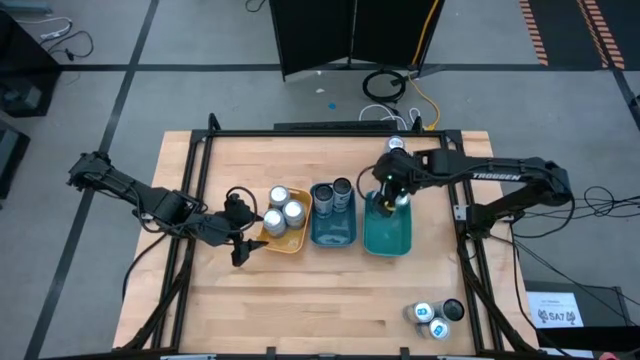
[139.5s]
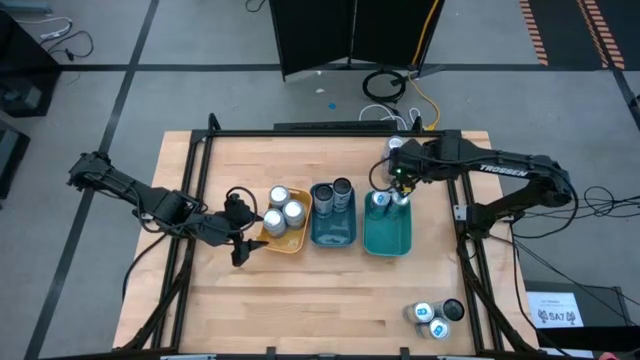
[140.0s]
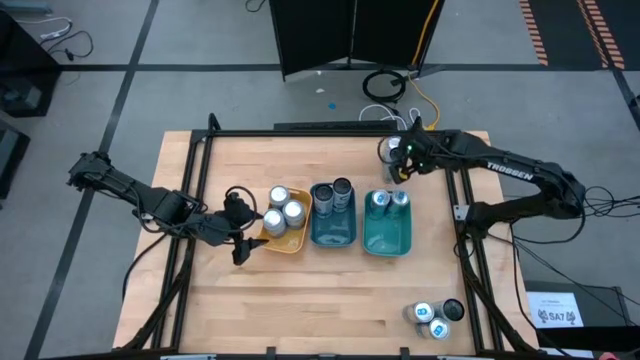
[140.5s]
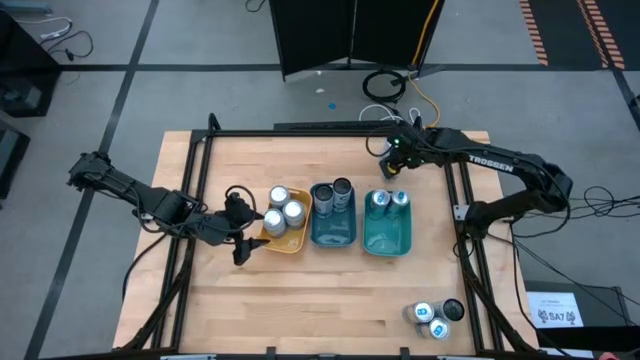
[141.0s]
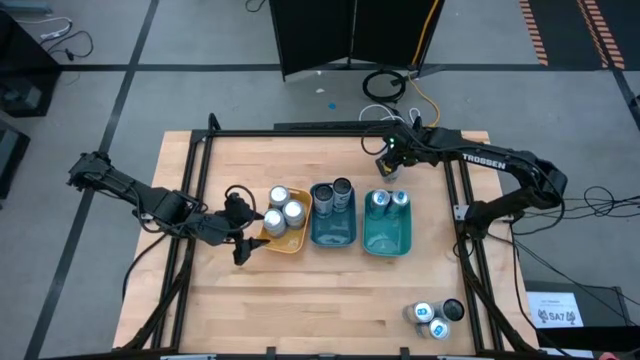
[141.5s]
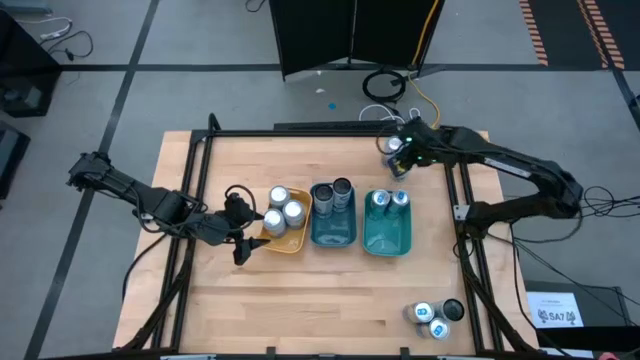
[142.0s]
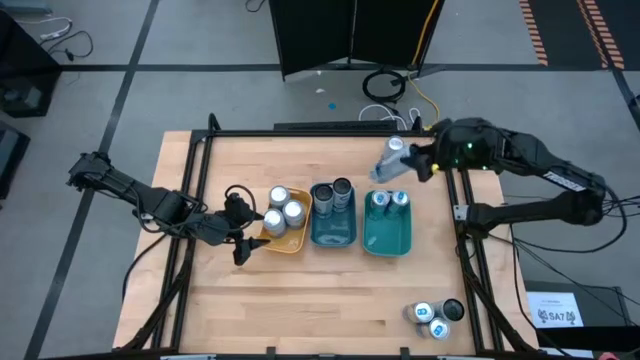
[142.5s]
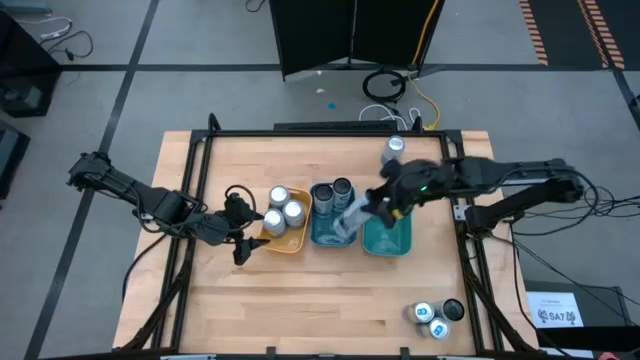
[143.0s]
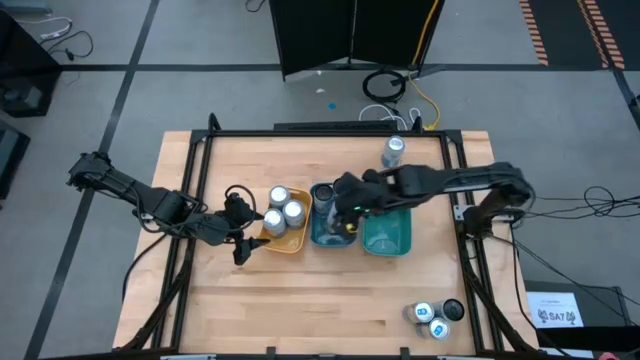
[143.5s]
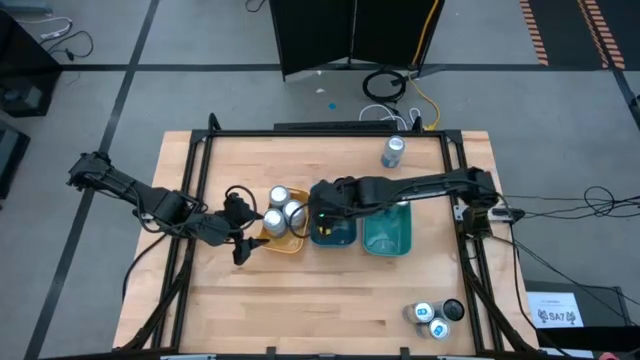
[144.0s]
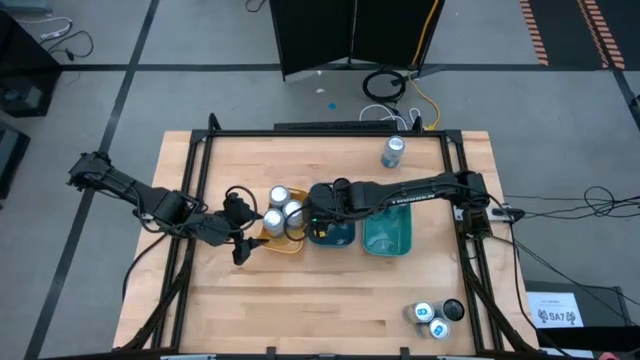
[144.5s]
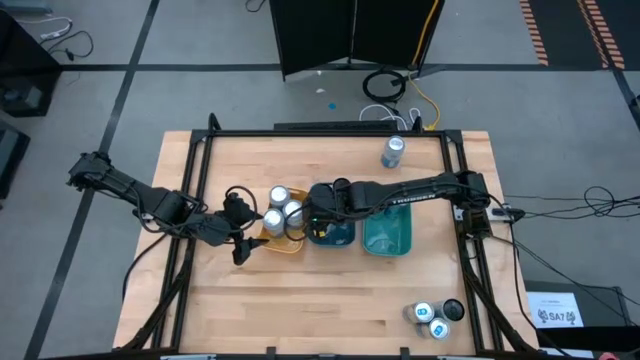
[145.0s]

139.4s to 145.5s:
Task: Sort soda cans
Put the white-blue soda can into the blue bin

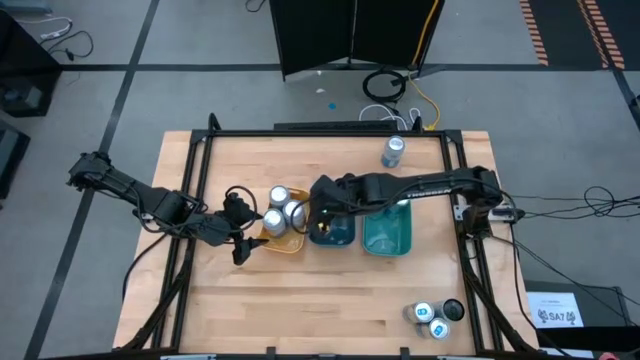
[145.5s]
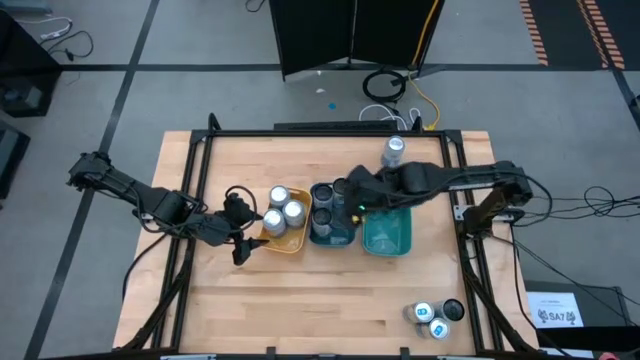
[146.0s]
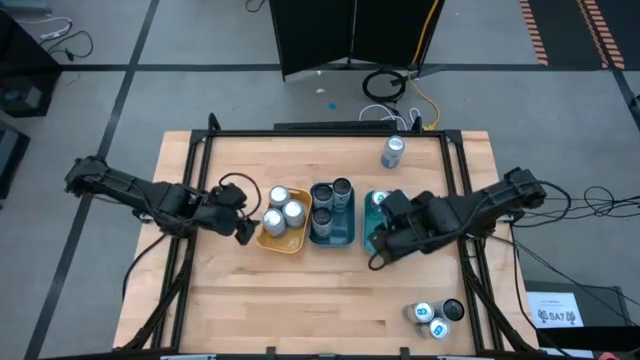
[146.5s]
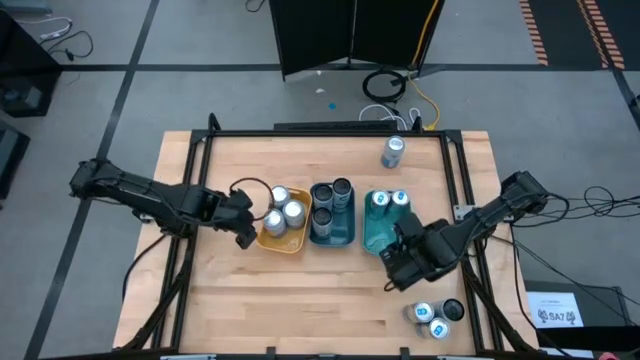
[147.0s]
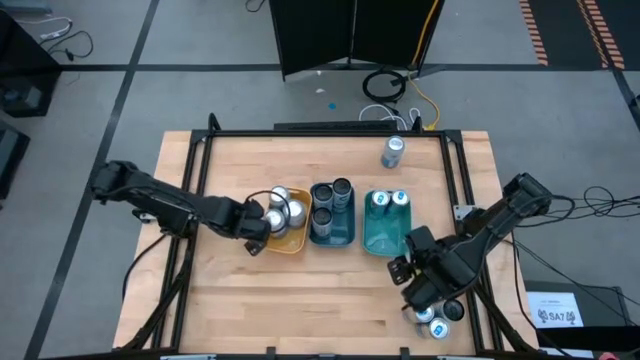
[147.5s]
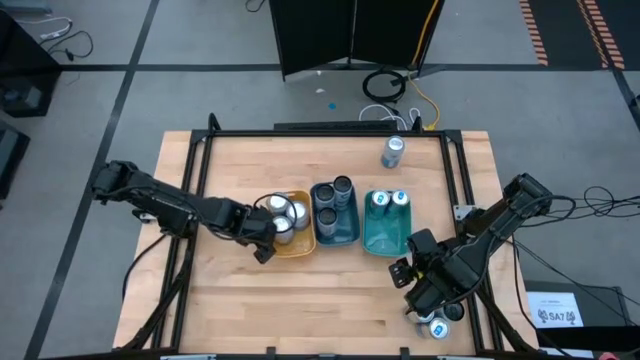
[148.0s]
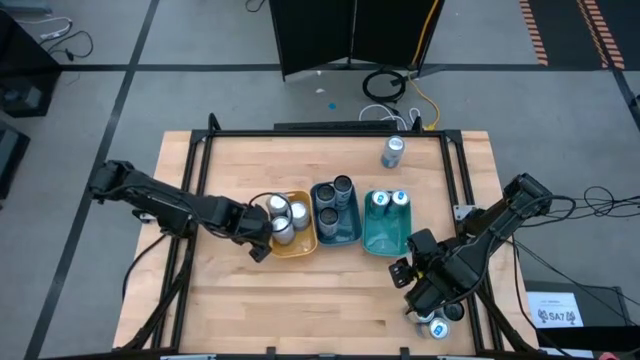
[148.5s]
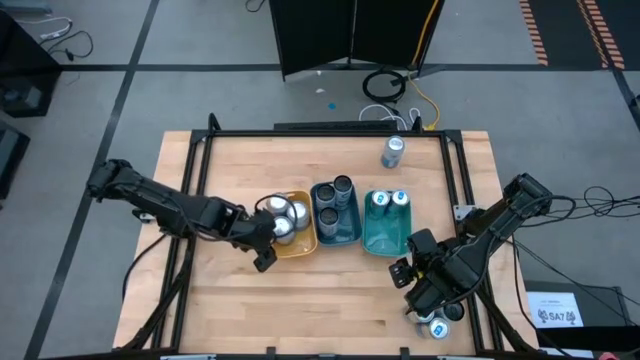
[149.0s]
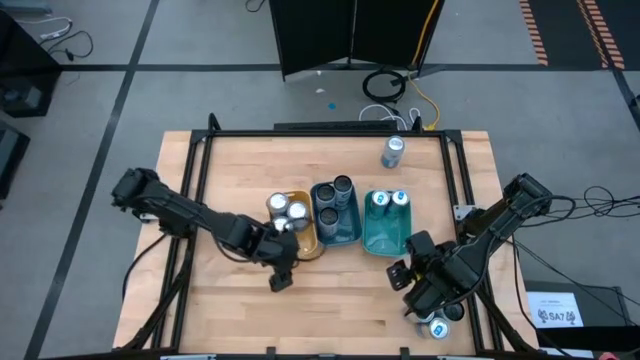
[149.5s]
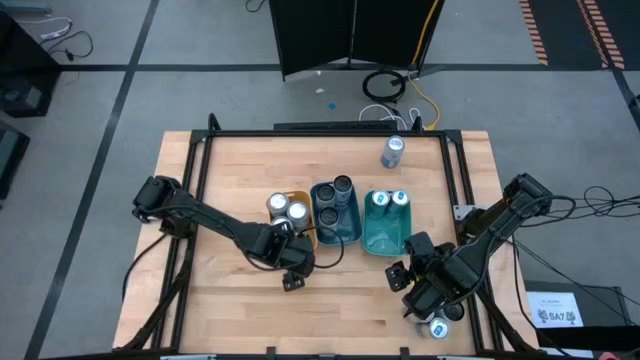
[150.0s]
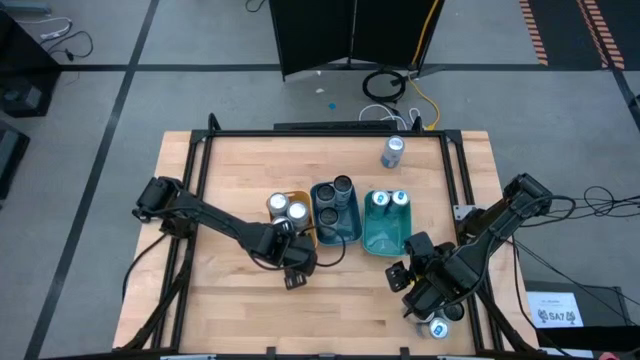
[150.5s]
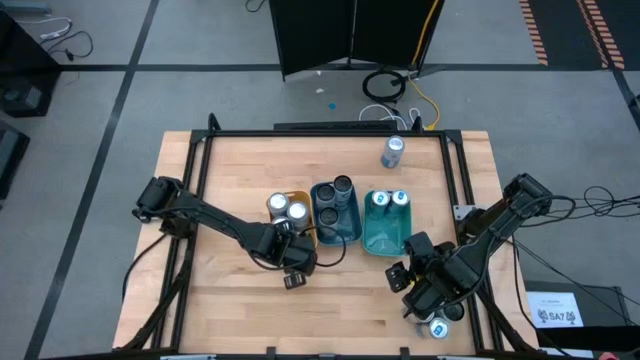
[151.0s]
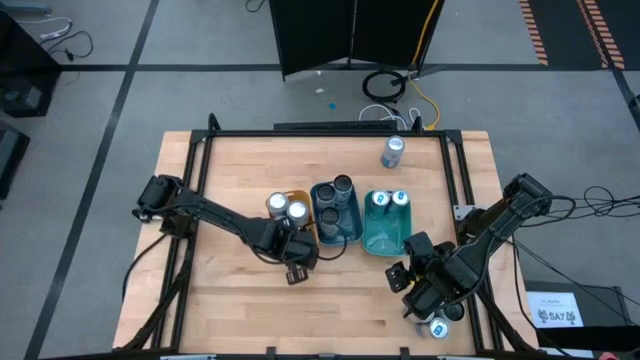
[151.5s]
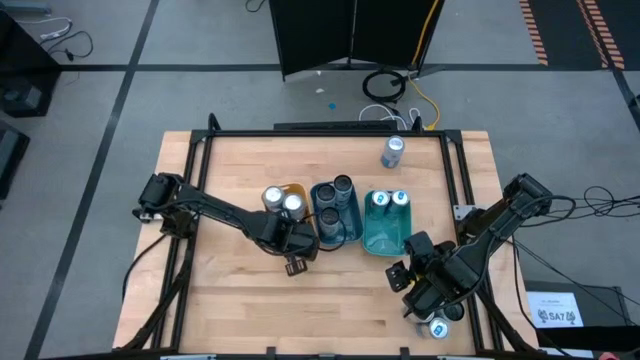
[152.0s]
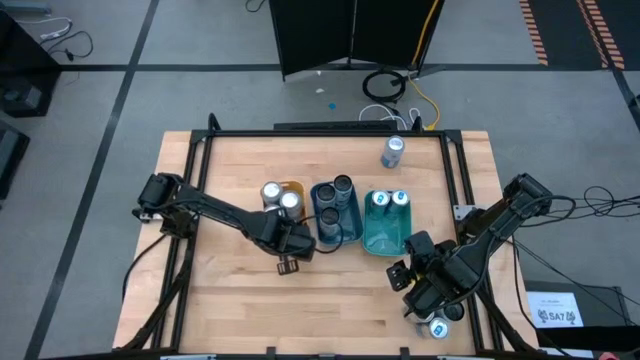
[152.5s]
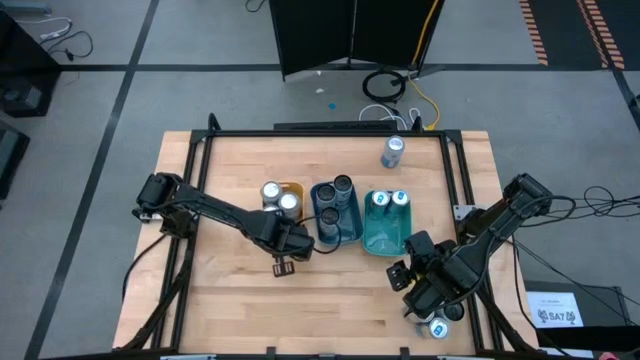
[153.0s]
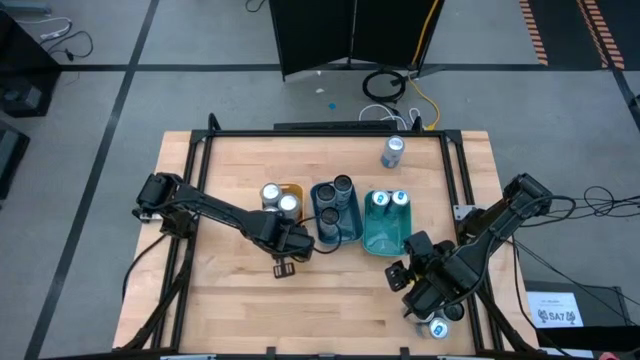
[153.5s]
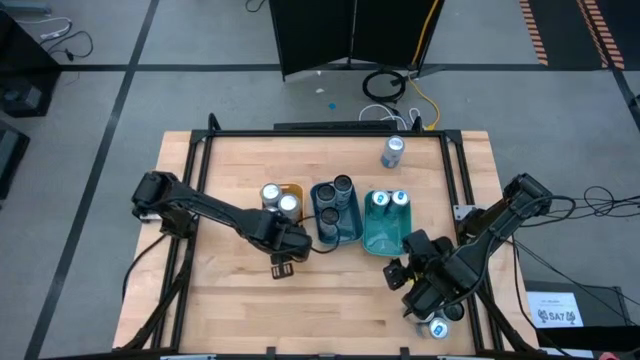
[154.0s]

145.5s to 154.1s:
Adjust the yellow bin

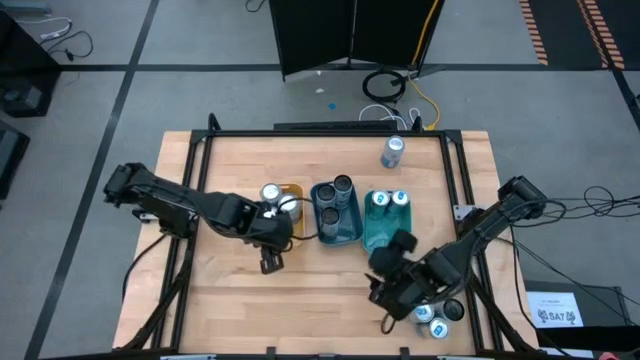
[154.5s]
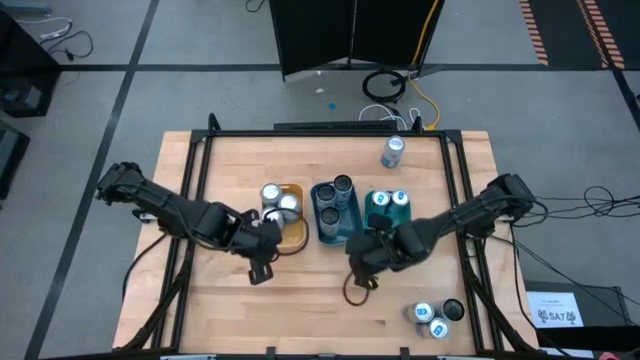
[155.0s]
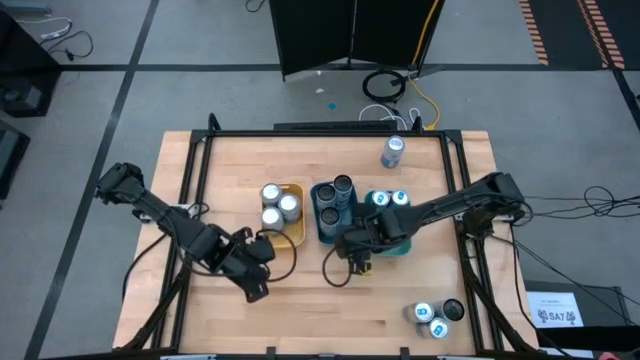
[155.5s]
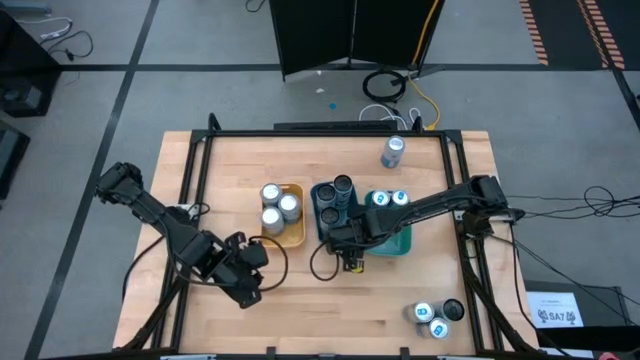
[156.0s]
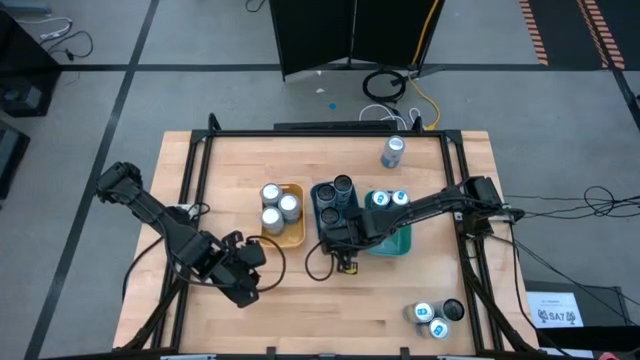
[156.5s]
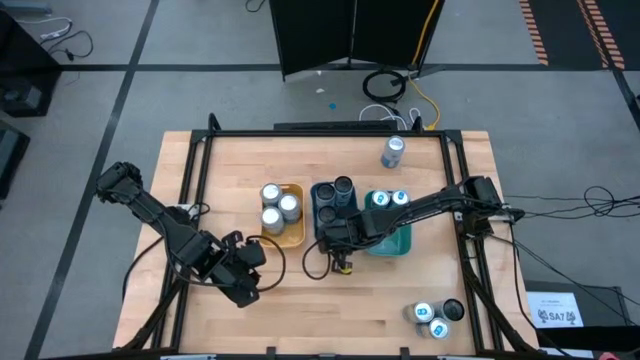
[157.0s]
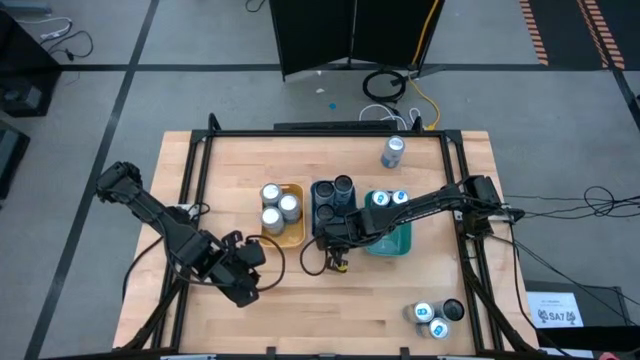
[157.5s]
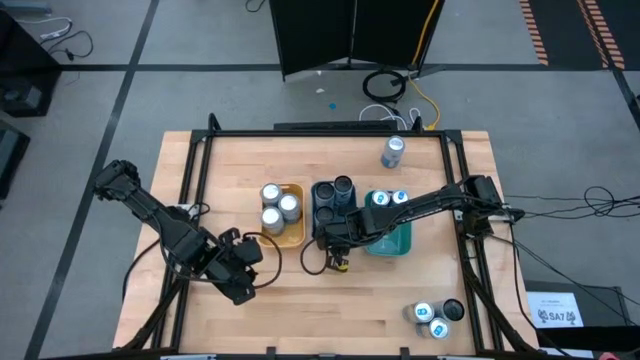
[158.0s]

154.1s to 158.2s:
Adjust the blue bin

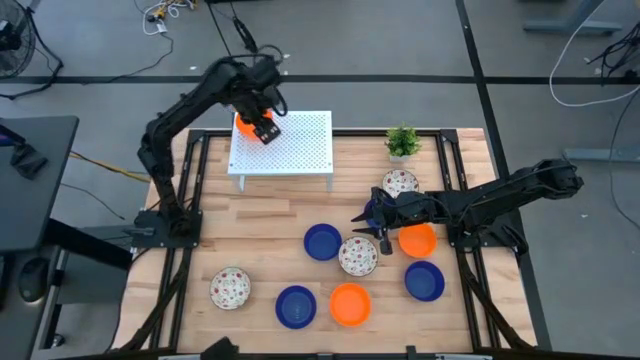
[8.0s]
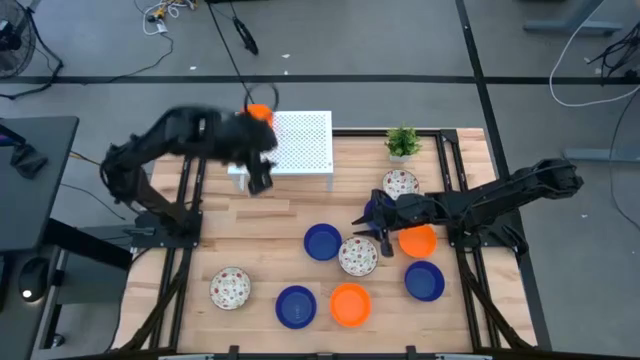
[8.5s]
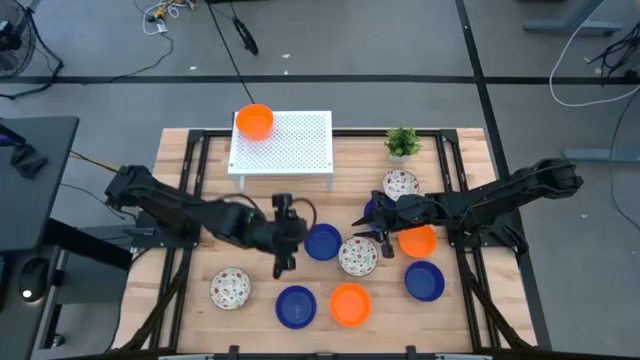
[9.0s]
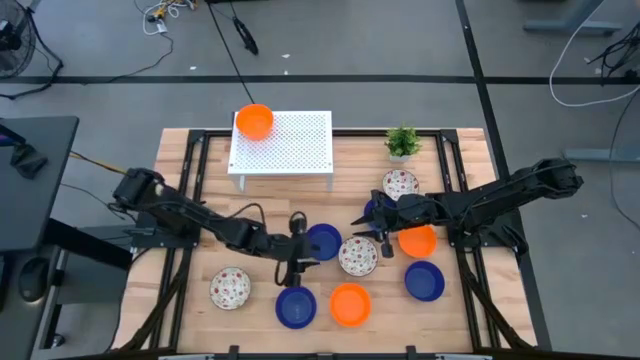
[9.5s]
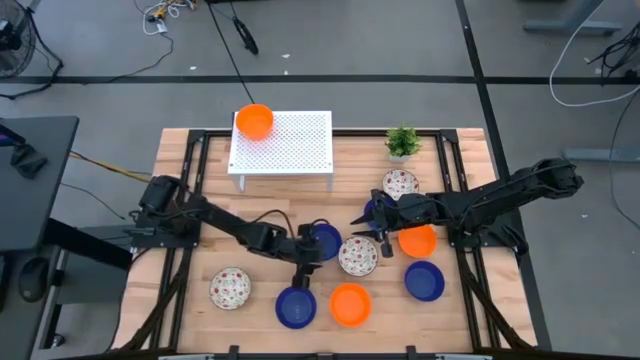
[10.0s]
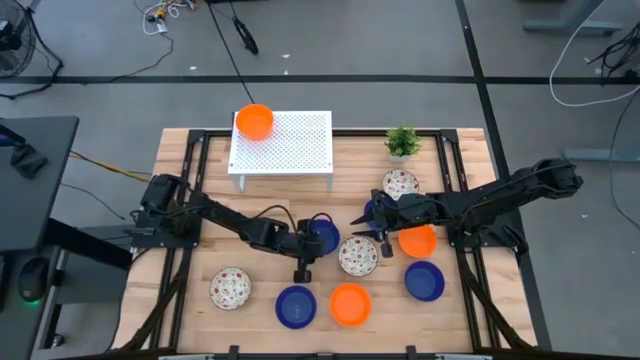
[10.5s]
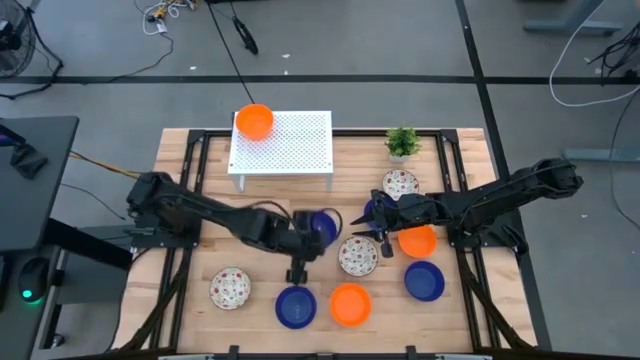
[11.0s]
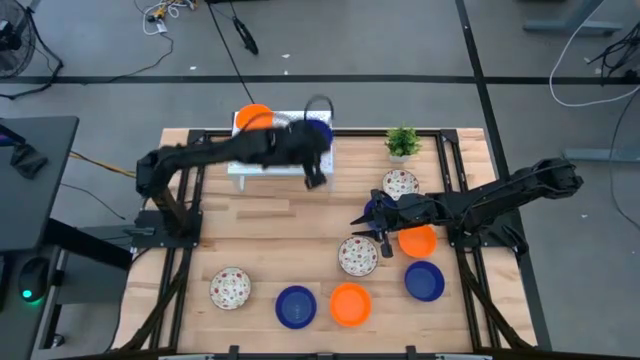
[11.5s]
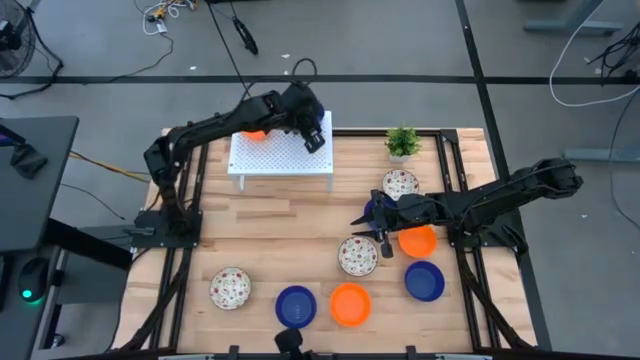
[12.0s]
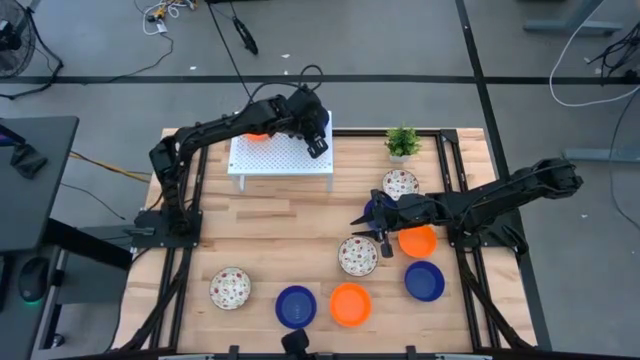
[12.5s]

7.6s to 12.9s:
Task: Pick & Place Mini bowls
Put the blue bowl on the shelf
